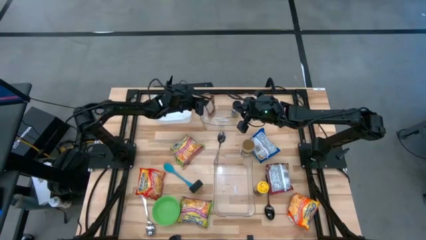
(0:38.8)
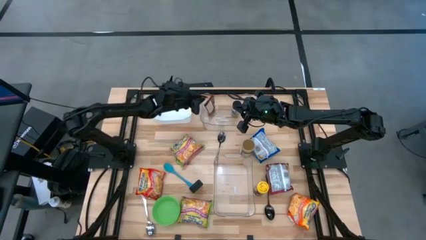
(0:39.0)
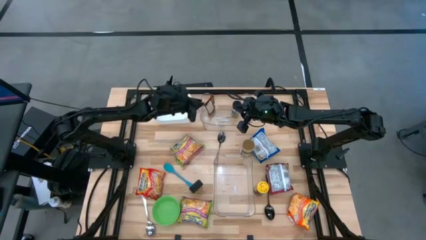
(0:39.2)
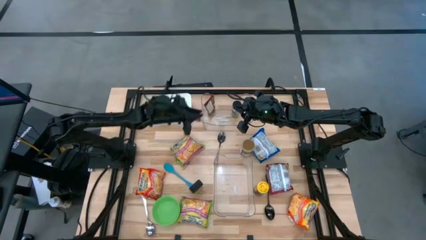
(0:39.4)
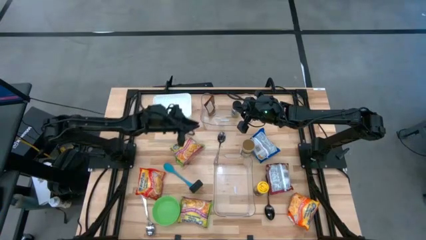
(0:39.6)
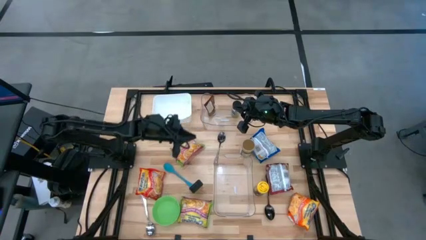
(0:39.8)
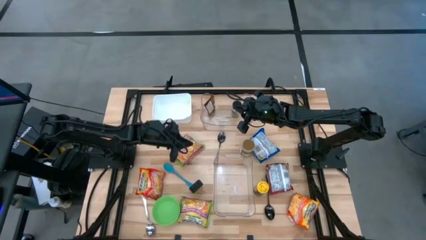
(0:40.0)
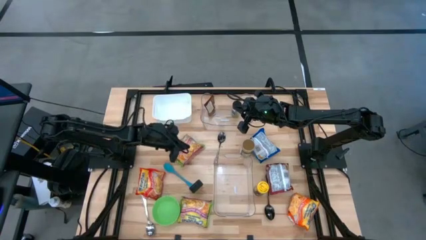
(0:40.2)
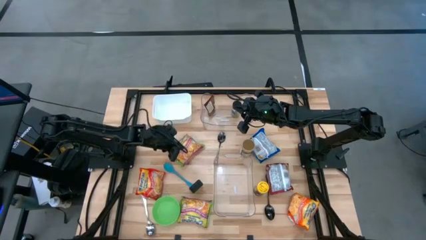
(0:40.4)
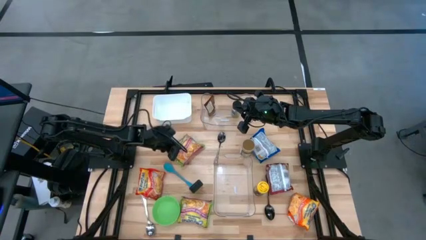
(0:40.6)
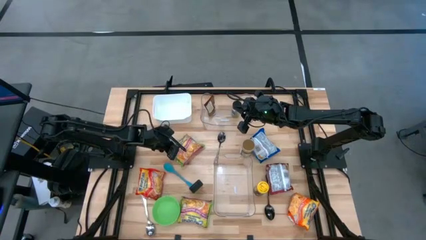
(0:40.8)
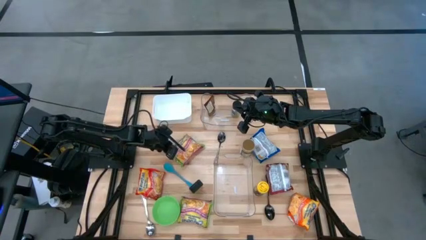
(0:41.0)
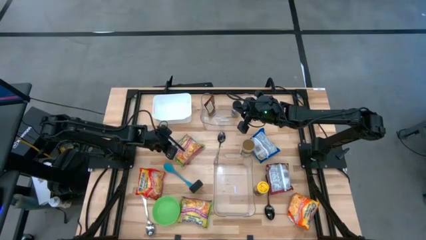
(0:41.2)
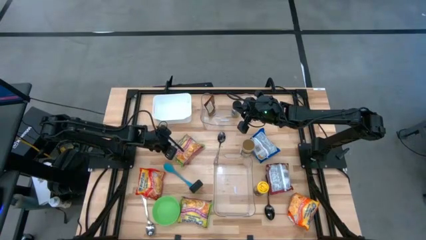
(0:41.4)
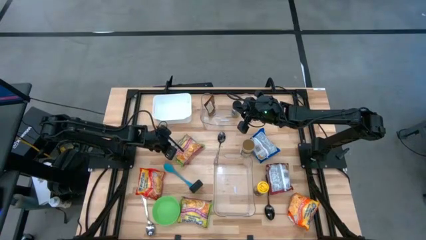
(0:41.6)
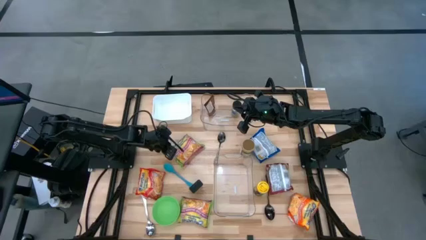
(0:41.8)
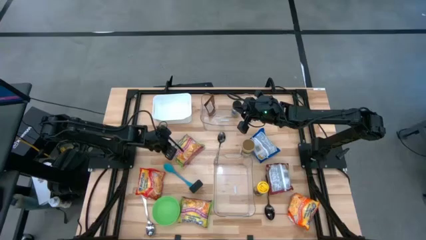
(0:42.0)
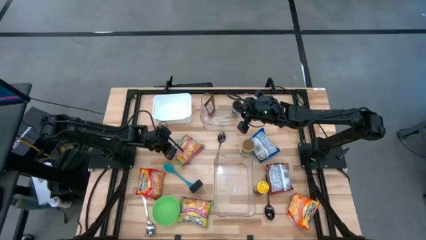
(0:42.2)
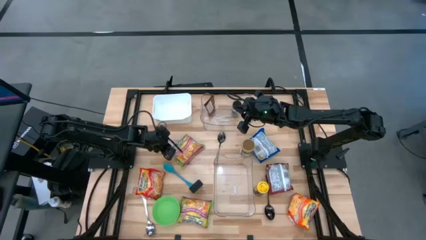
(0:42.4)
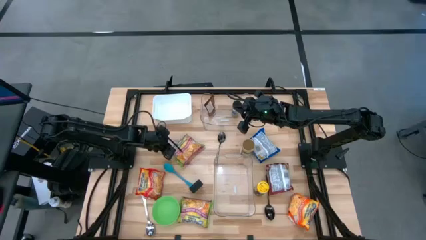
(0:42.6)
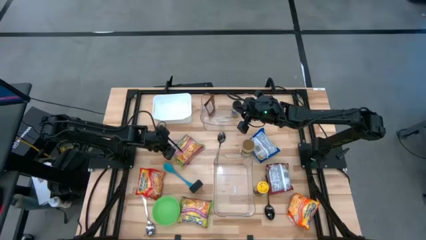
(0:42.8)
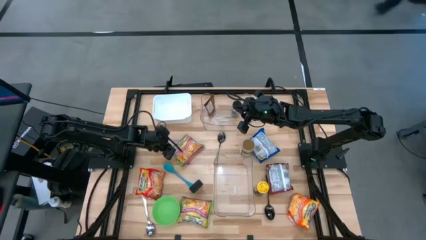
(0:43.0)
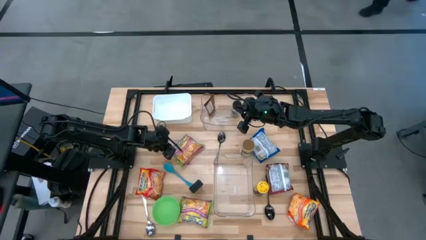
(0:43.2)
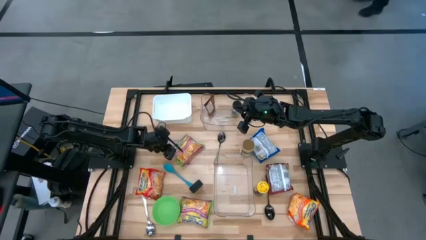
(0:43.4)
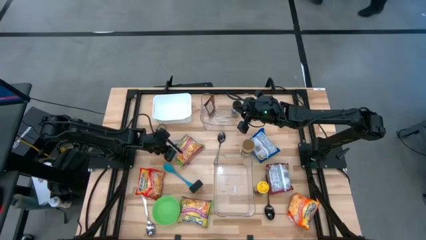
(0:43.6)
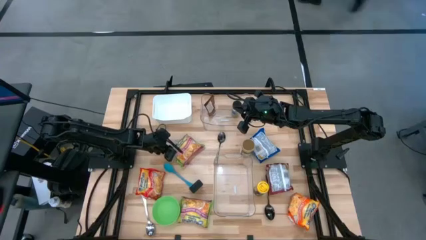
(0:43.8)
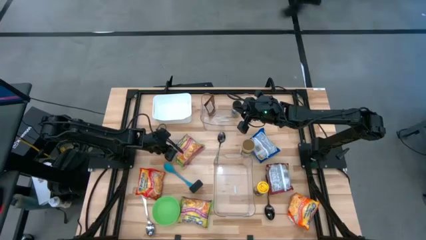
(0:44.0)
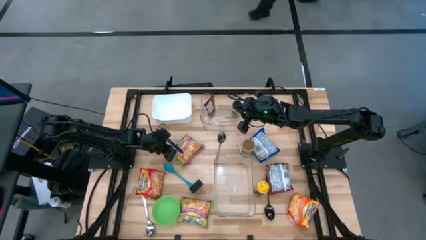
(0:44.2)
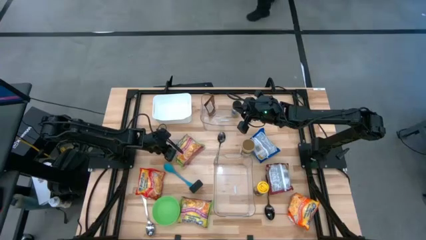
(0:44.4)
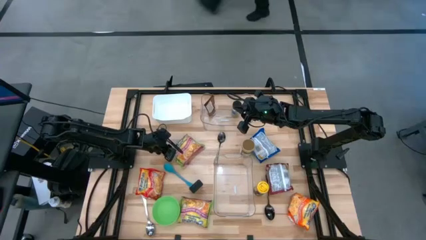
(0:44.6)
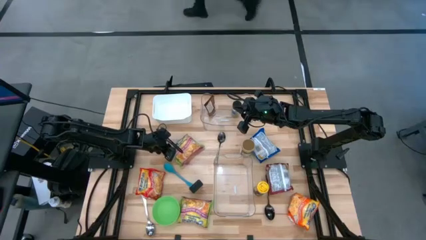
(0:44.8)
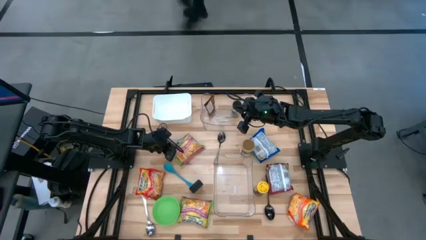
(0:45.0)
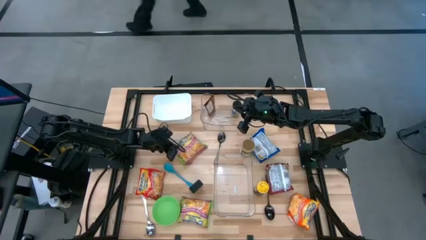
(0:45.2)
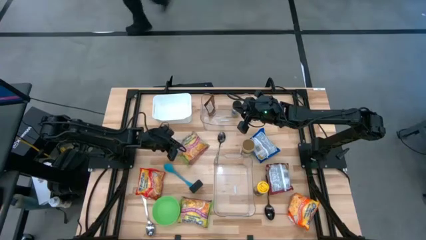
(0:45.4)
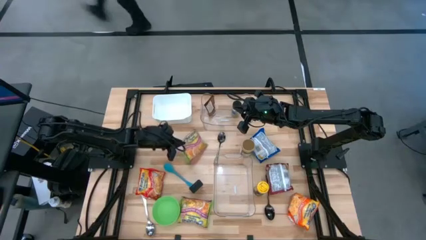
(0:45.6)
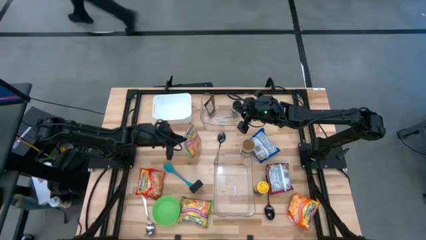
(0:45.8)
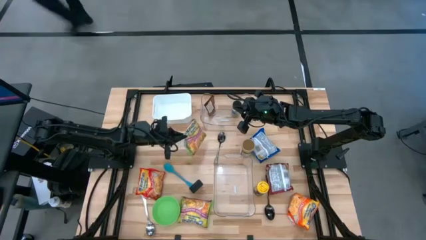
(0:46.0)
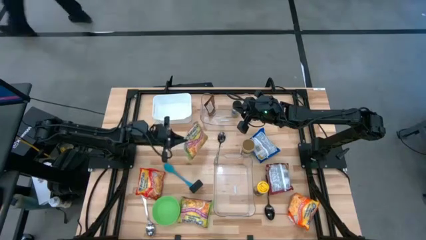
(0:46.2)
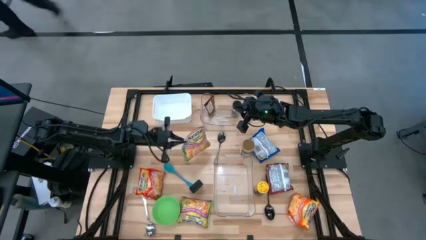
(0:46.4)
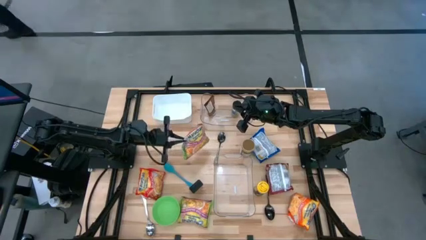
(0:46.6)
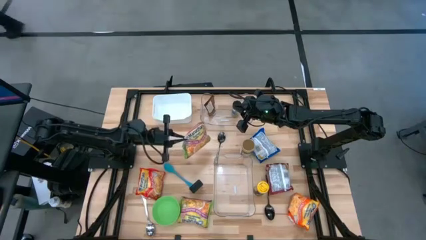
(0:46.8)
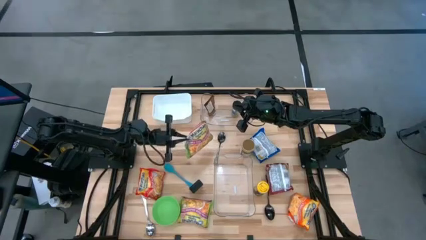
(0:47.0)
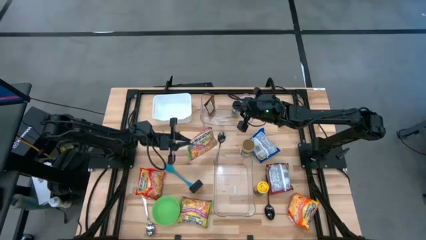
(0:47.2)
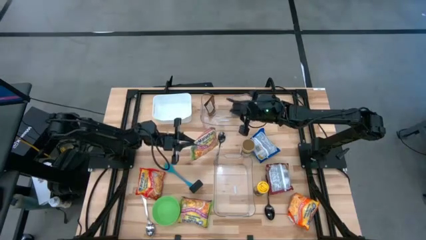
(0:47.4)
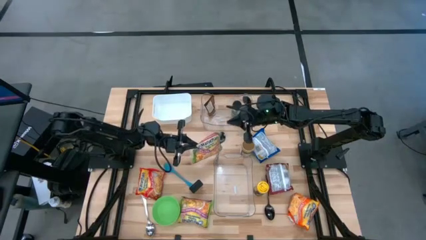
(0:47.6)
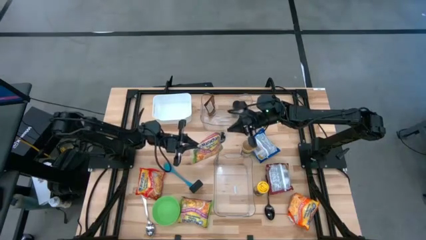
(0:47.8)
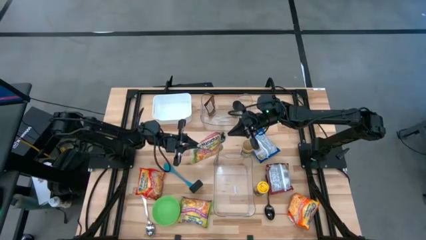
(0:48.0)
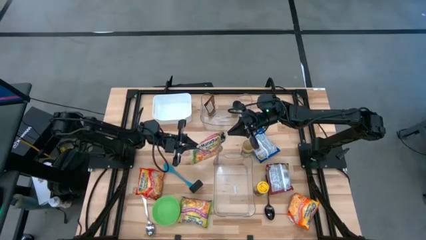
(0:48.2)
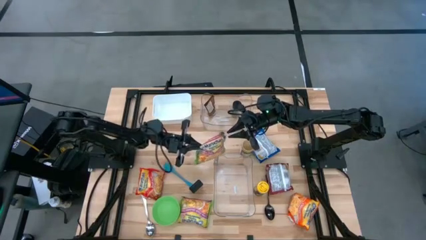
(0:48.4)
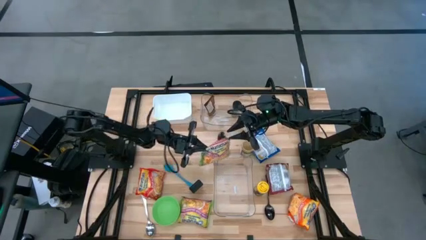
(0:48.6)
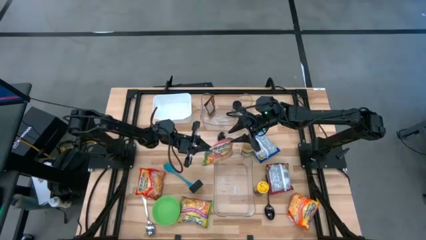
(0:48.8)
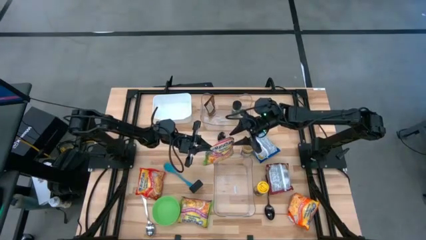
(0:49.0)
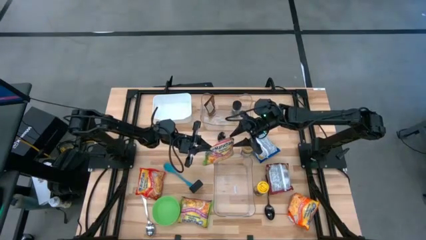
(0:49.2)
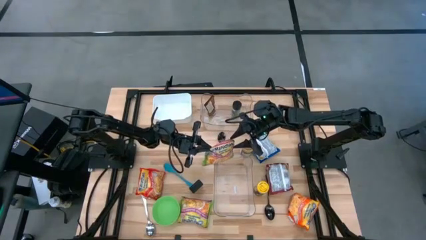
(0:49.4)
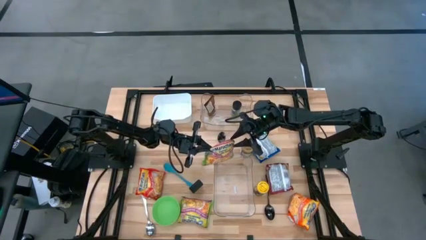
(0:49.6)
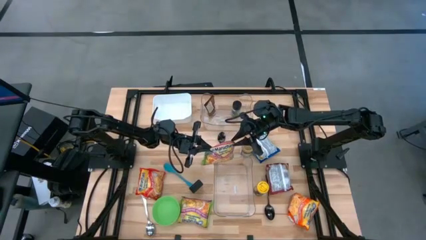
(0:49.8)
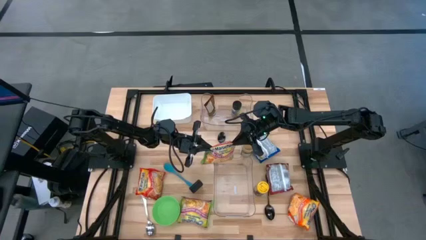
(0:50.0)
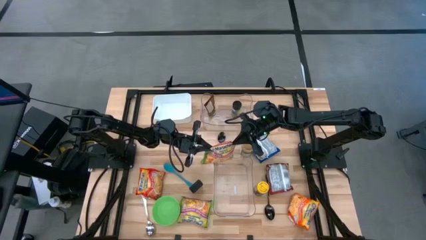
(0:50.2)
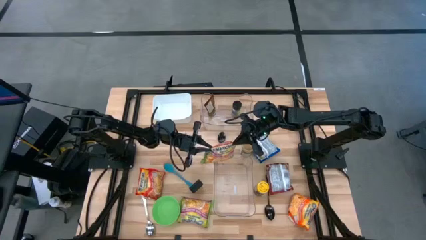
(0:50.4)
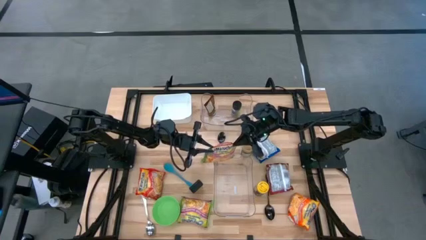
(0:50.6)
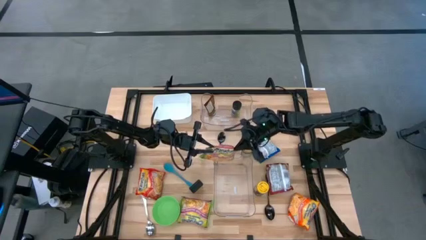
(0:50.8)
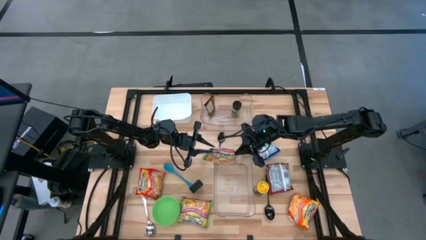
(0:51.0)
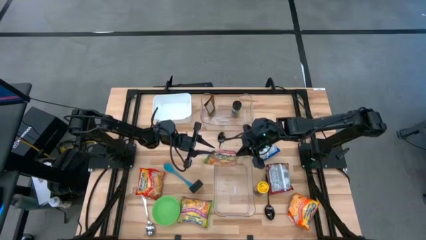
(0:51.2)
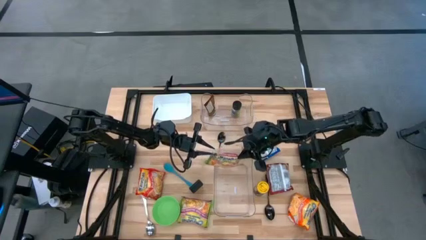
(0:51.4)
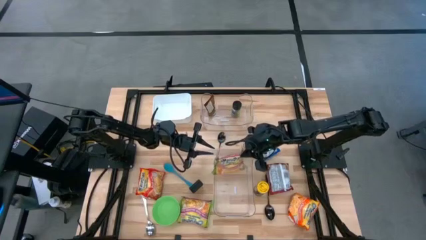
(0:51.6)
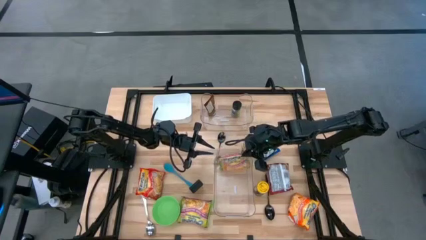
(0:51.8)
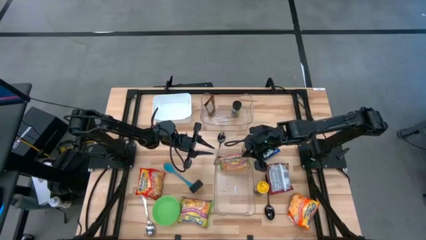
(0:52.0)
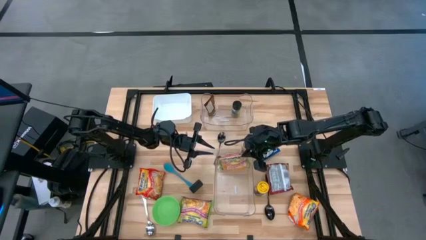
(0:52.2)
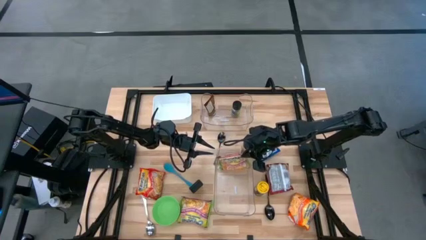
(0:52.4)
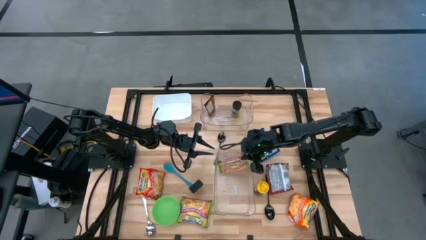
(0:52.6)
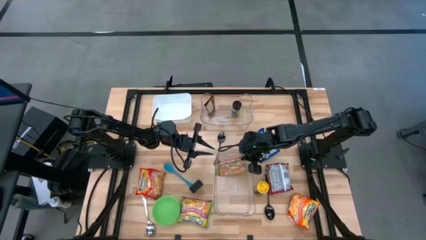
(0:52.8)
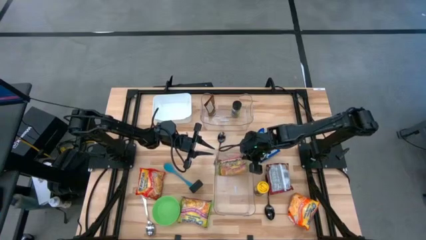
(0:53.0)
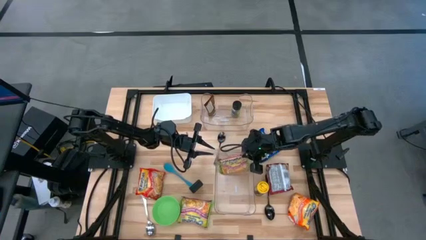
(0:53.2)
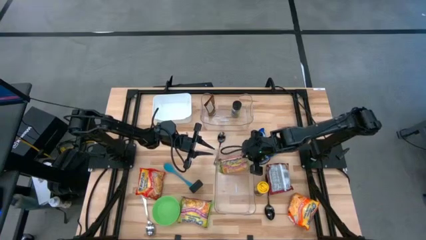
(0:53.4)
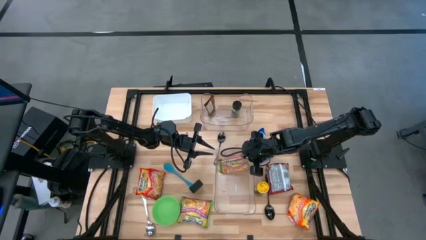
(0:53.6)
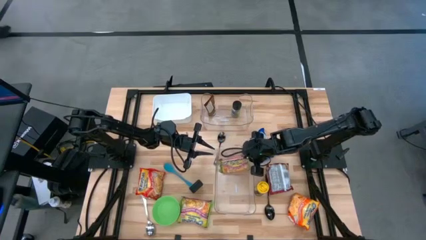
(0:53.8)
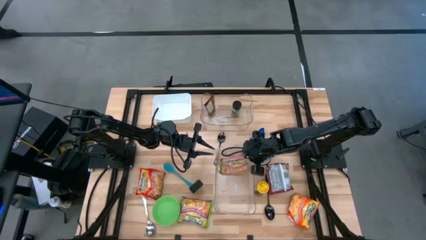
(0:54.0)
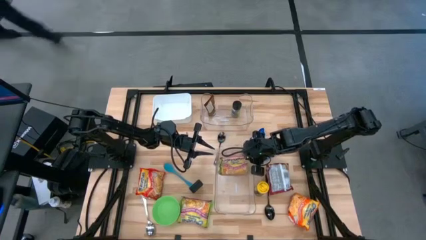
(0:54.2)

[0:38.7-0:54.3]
Task: Pick & Place Food Item
Put the top green noodle pack into the bottom transparent bin
